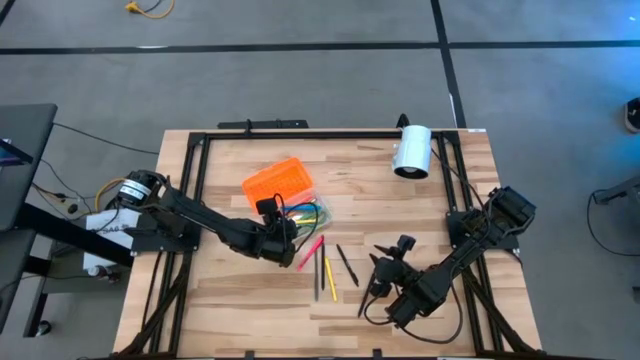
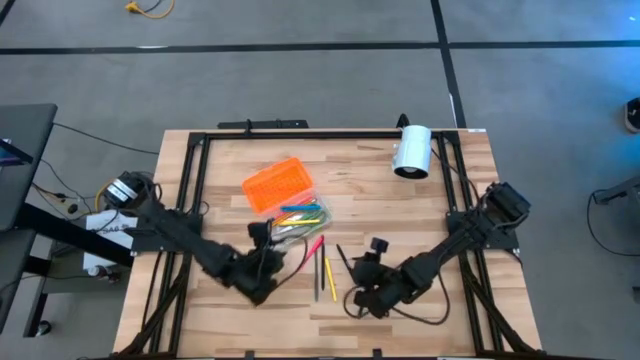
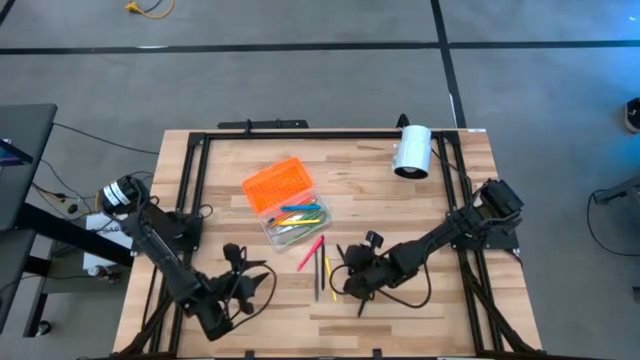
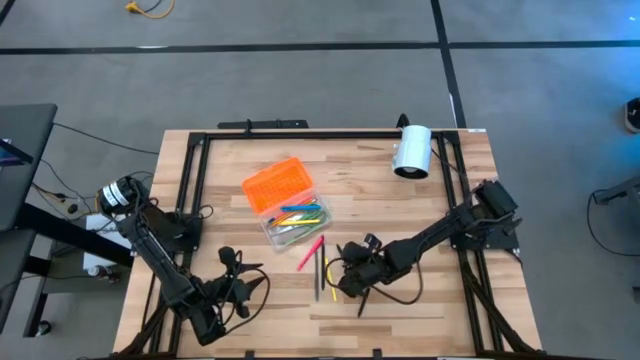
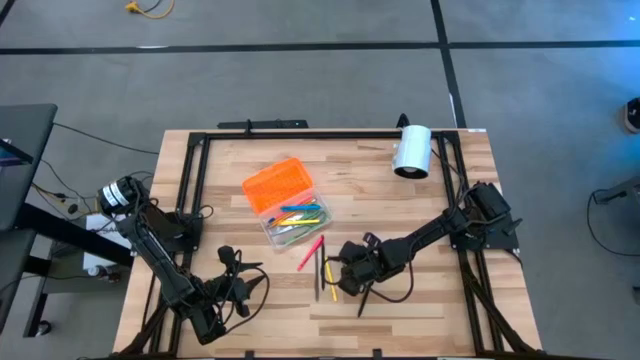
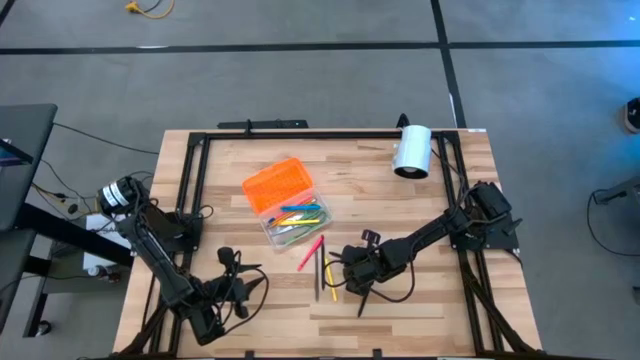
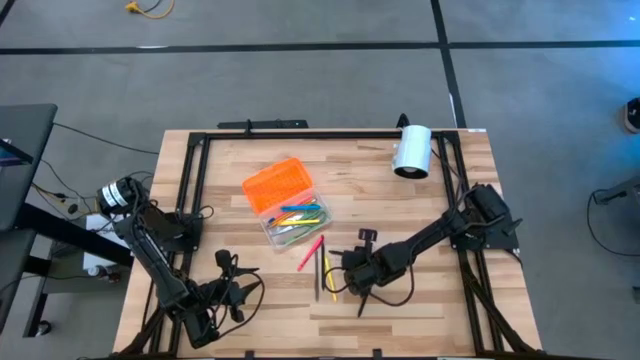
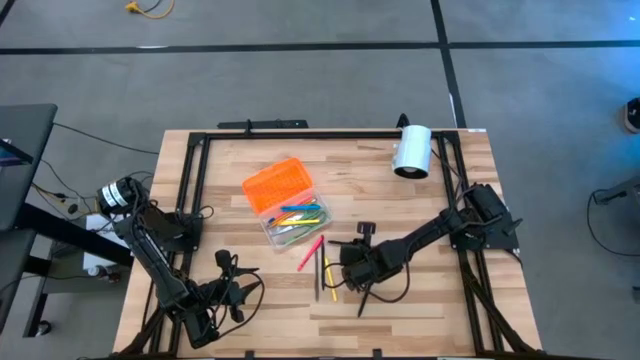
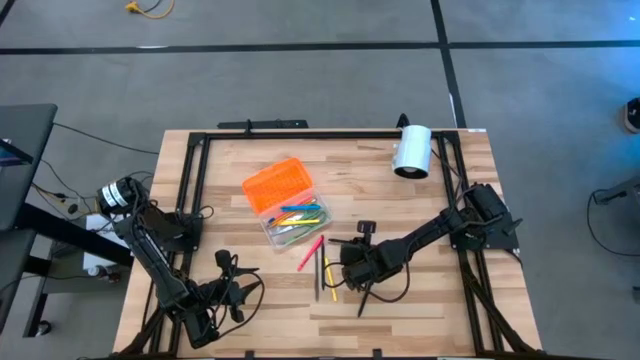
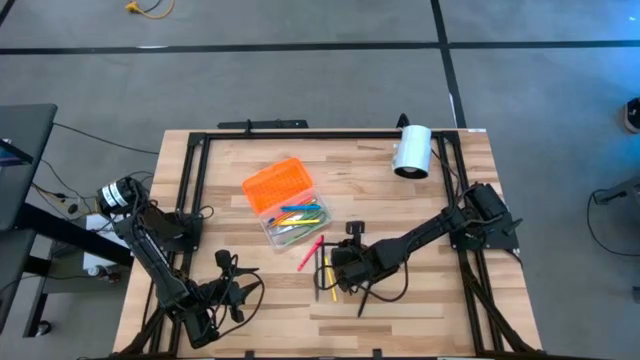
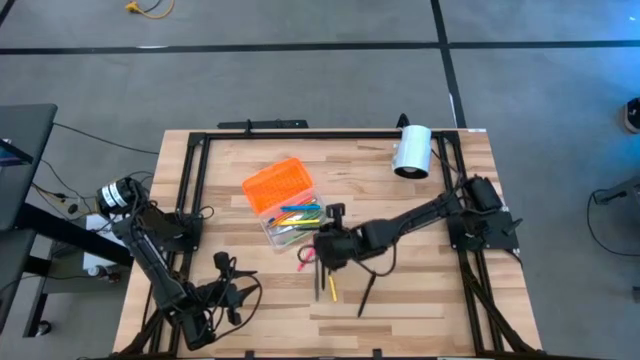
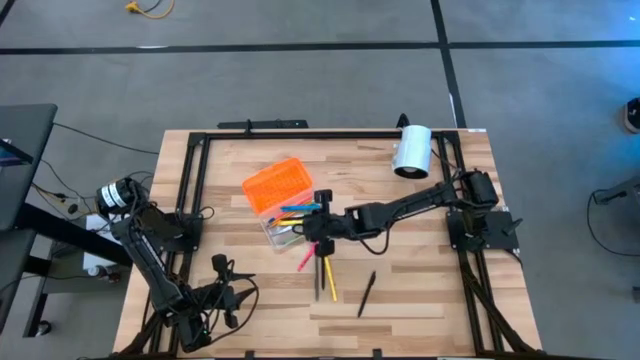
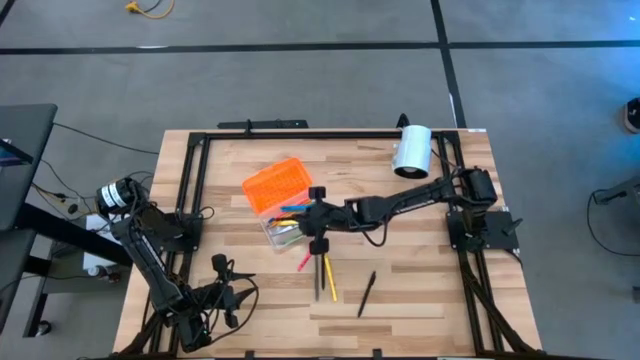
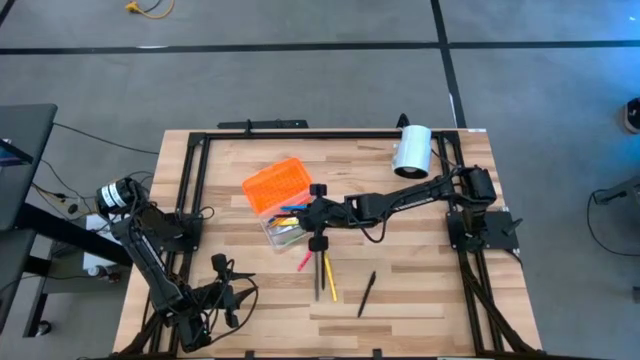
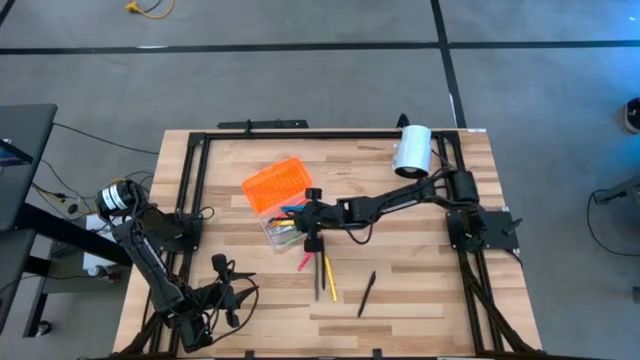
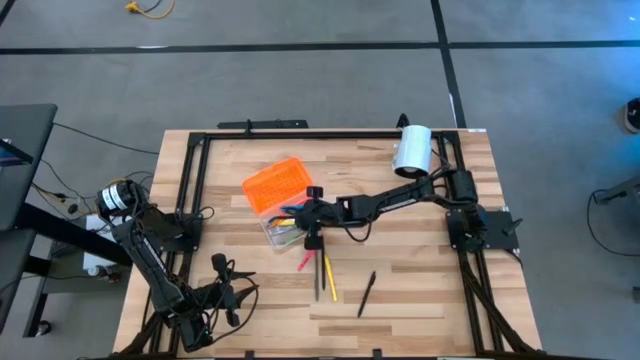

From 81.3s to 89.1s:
Task: Pick & place school supplies into a supply box
Put the middle black pen into the supply box

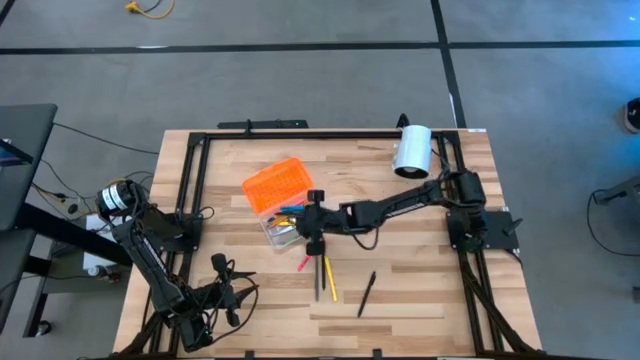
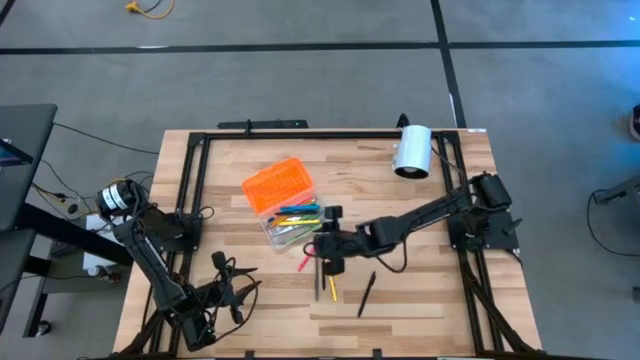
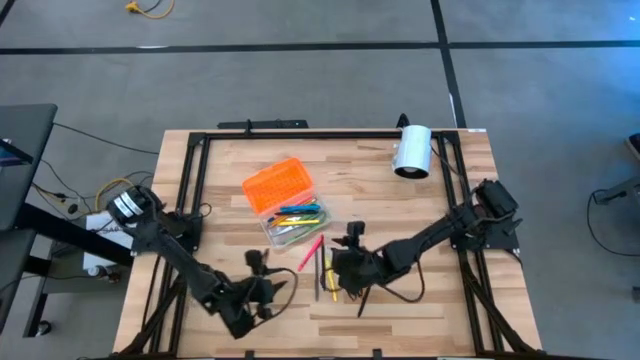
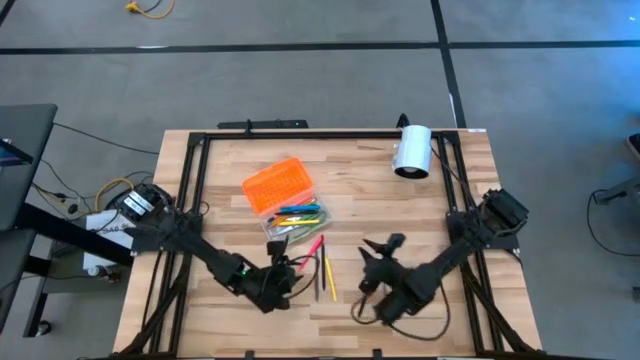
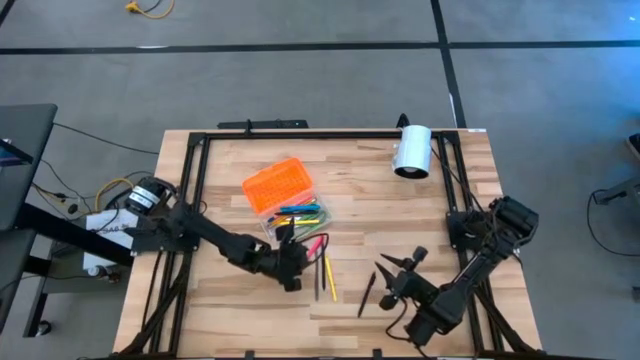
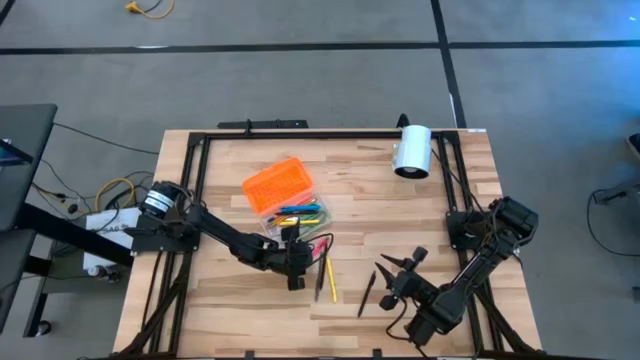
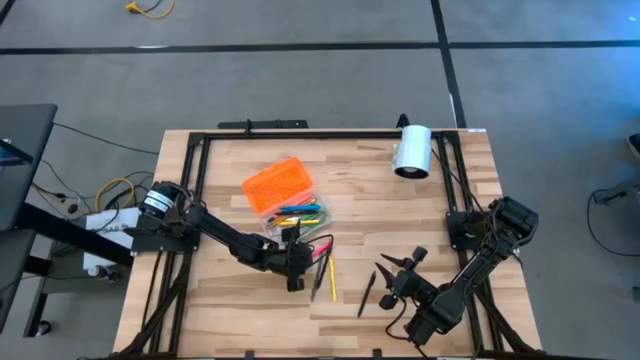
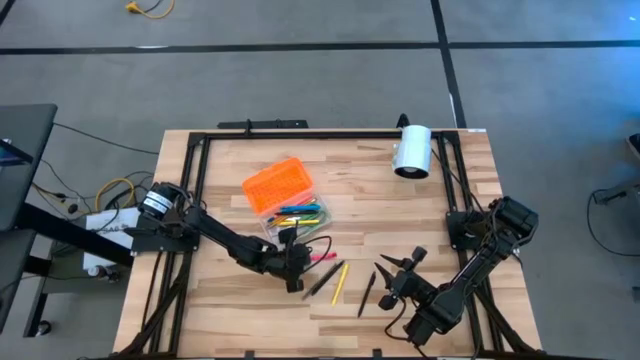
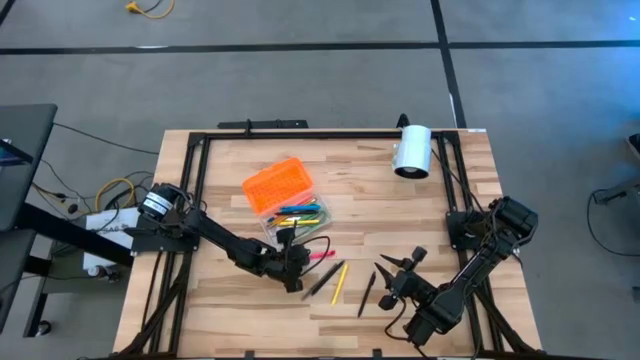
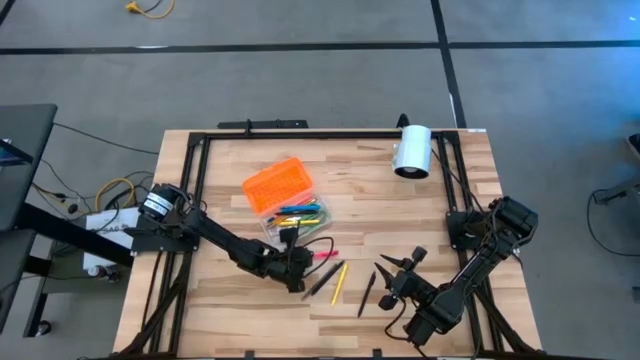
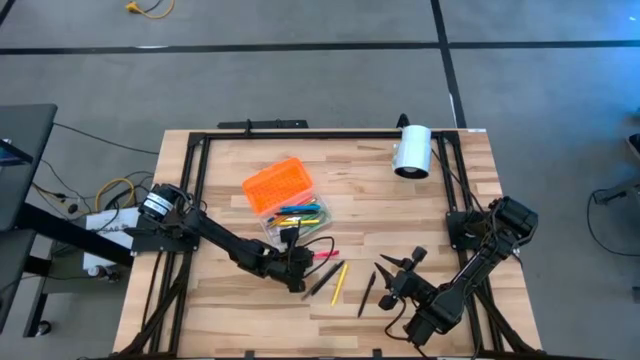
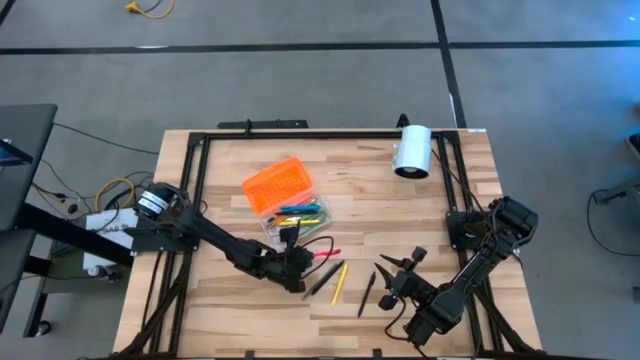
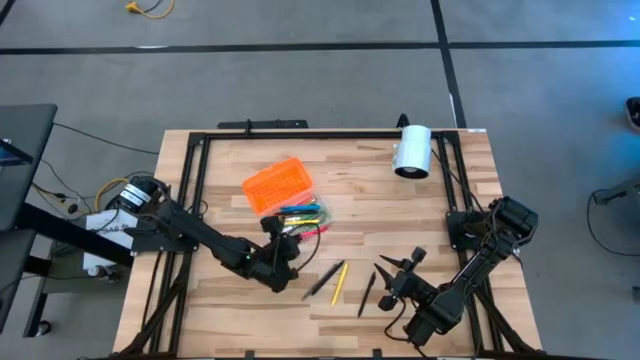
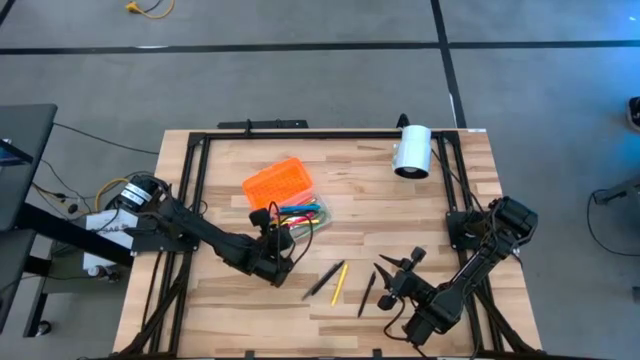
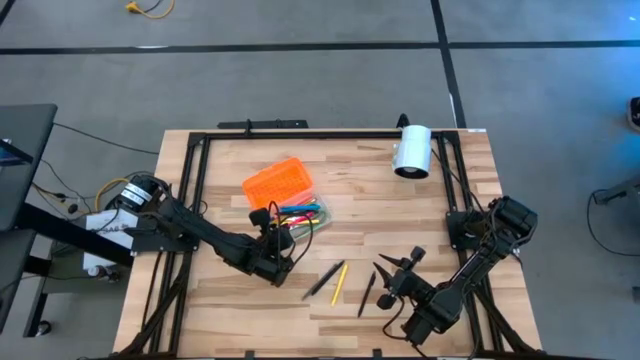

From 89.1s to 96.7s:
Put the pink pen into the supply box

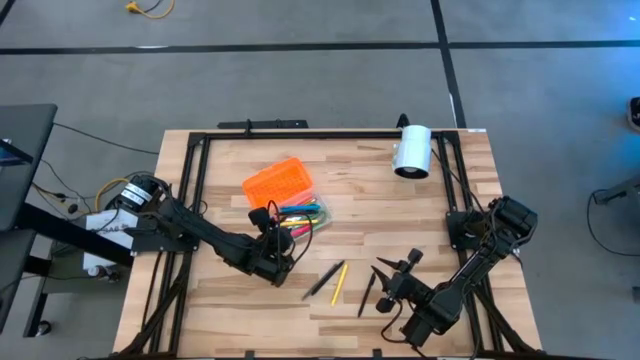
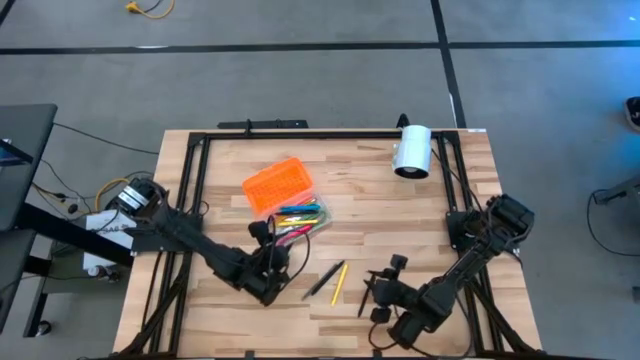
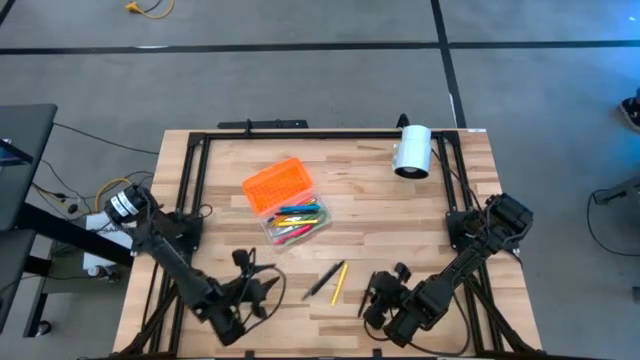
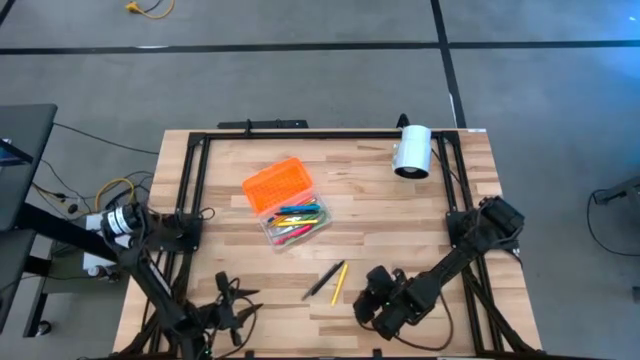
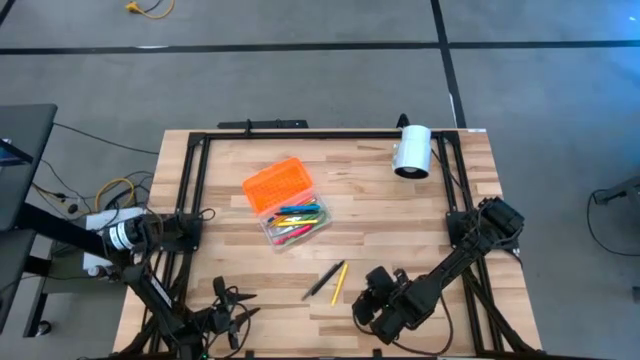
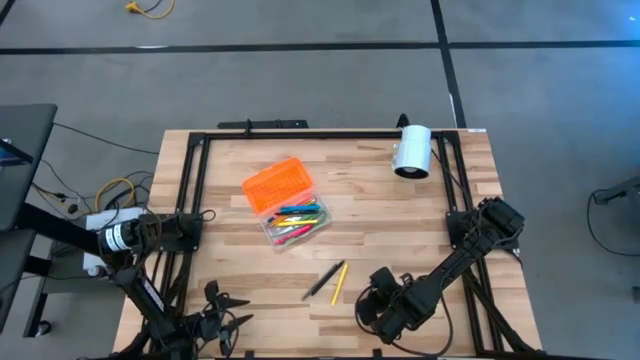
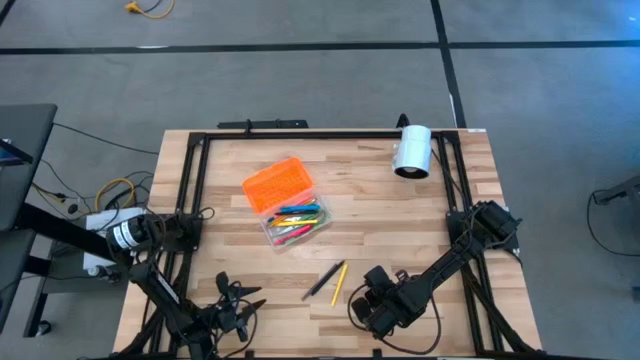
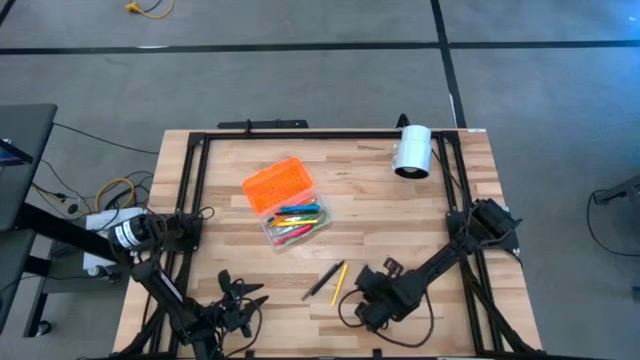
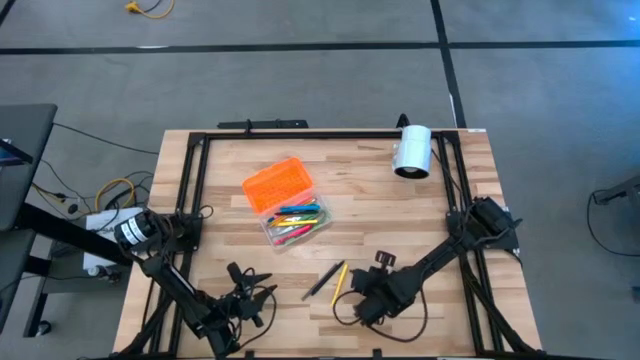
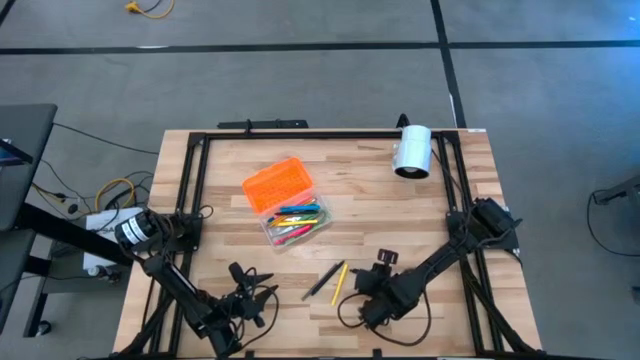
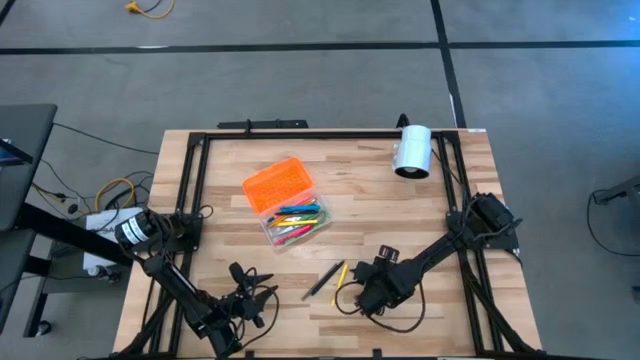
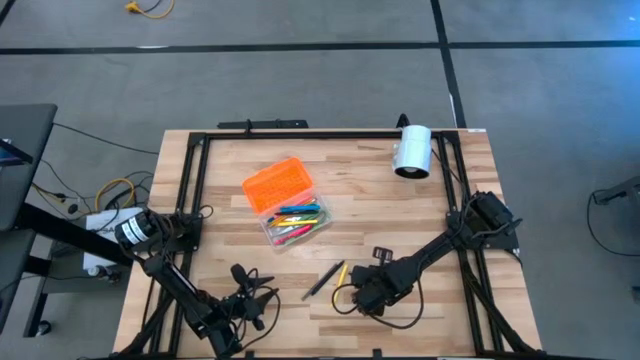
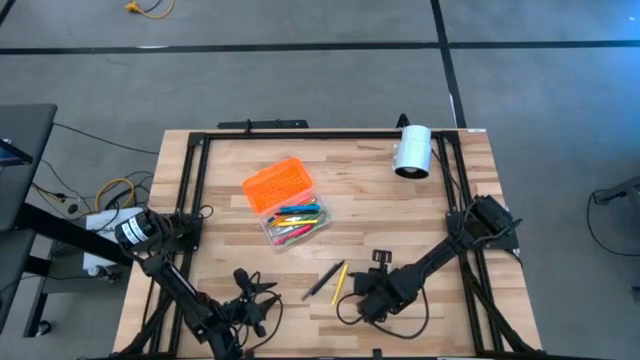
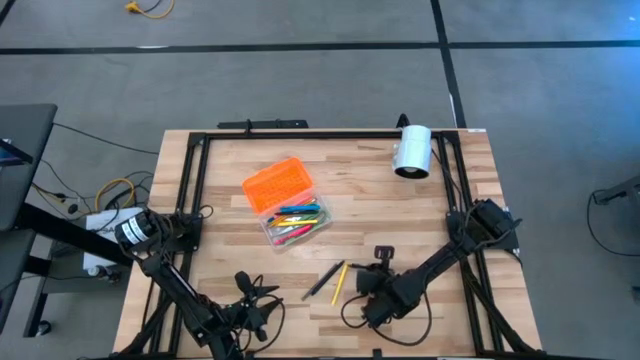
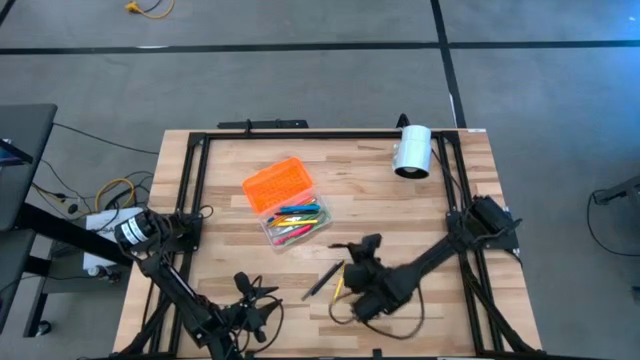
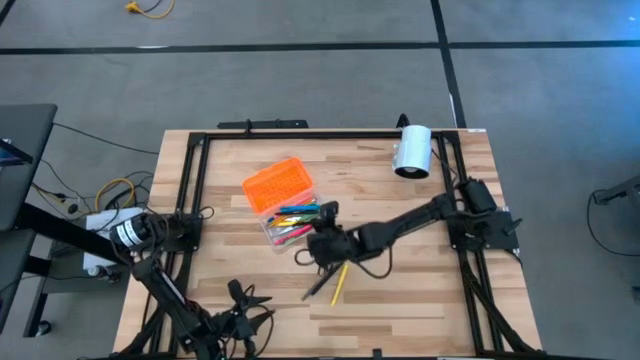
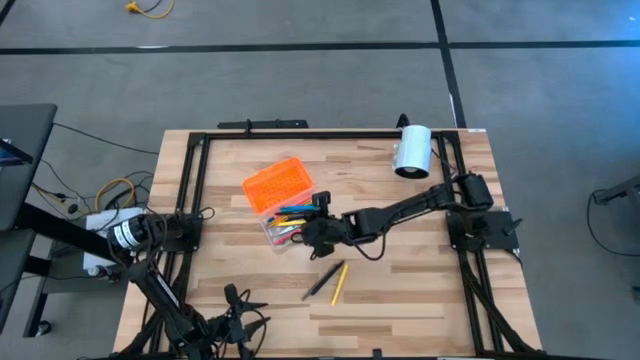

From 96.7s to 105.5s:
Put the right black pen into the supply box
